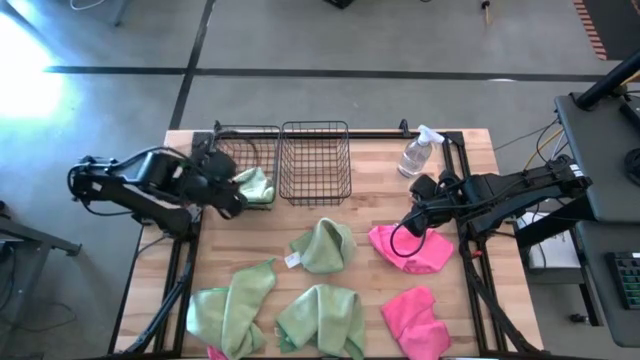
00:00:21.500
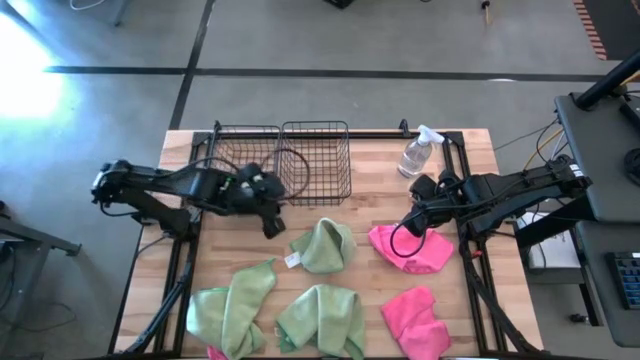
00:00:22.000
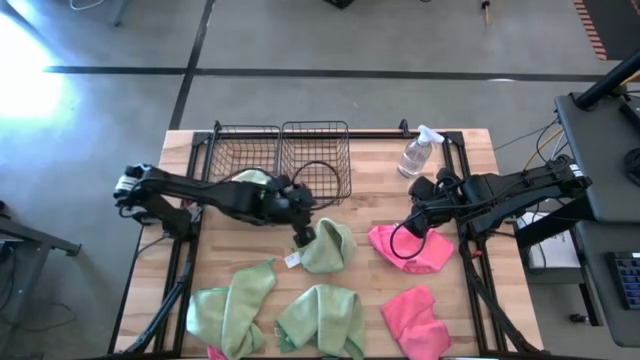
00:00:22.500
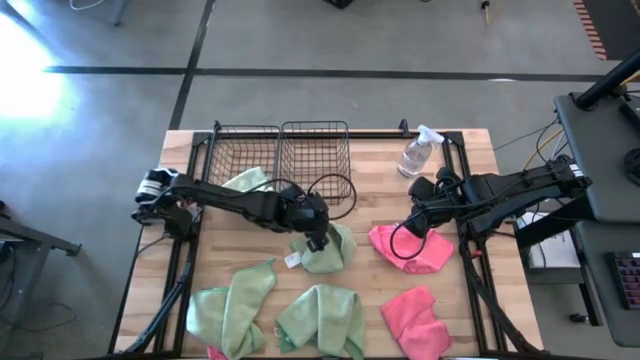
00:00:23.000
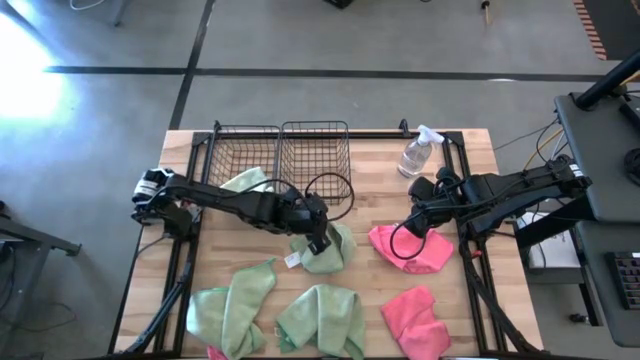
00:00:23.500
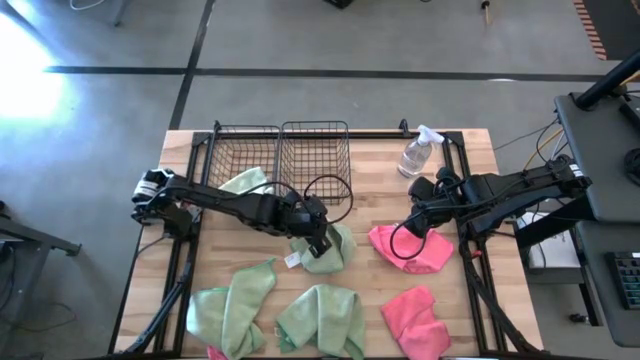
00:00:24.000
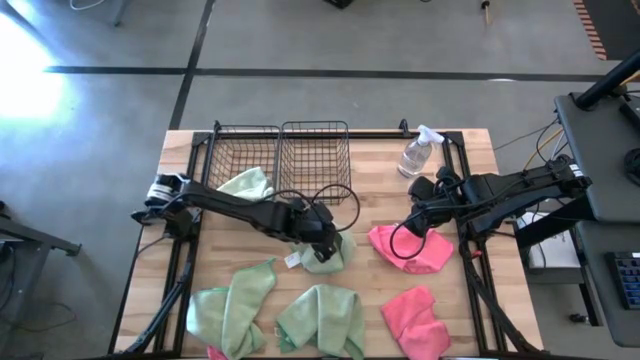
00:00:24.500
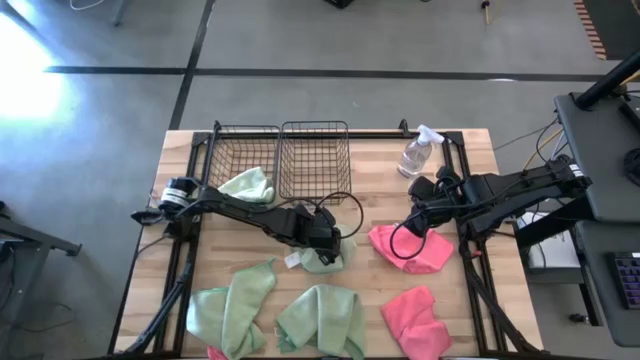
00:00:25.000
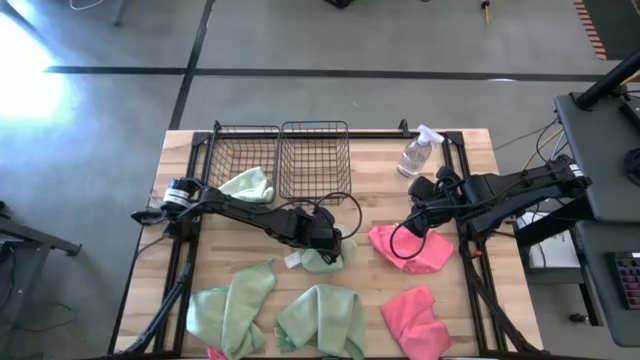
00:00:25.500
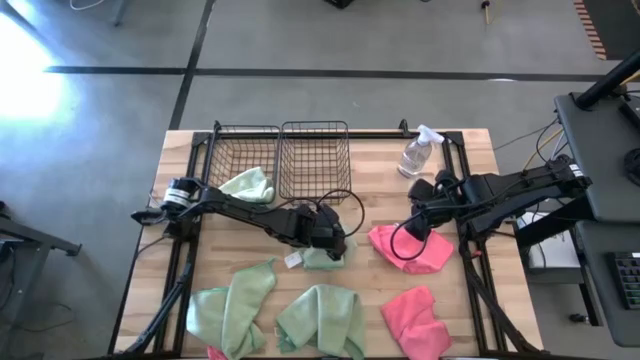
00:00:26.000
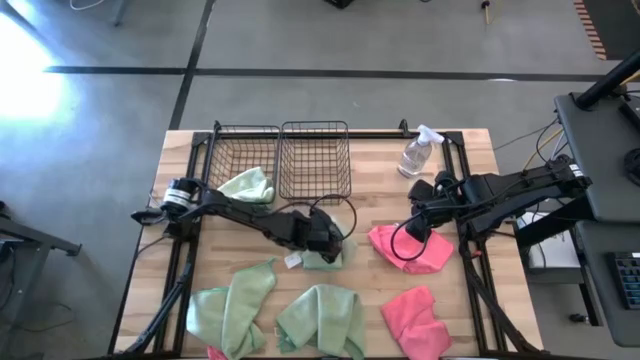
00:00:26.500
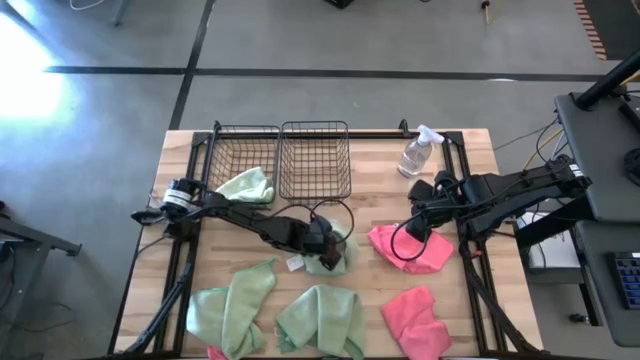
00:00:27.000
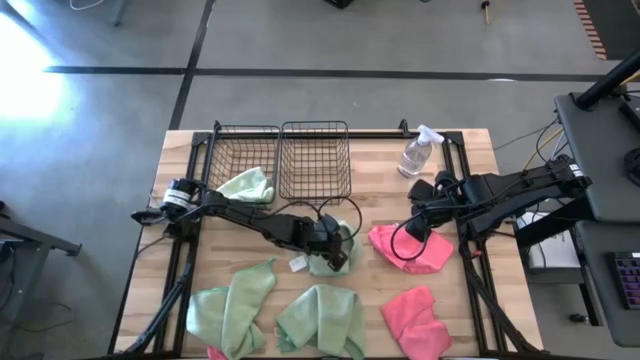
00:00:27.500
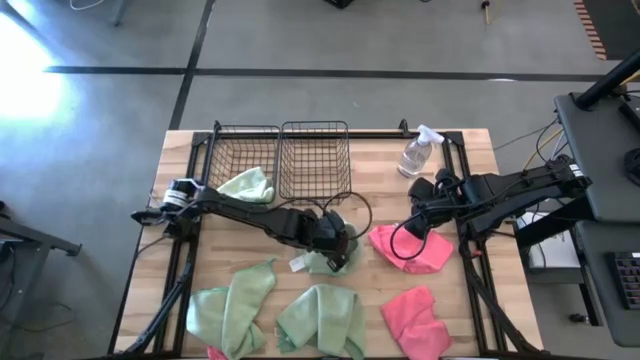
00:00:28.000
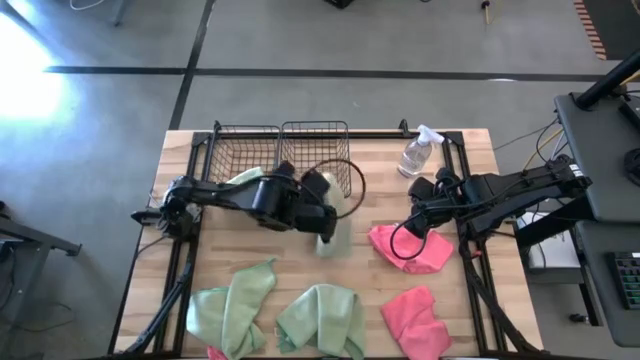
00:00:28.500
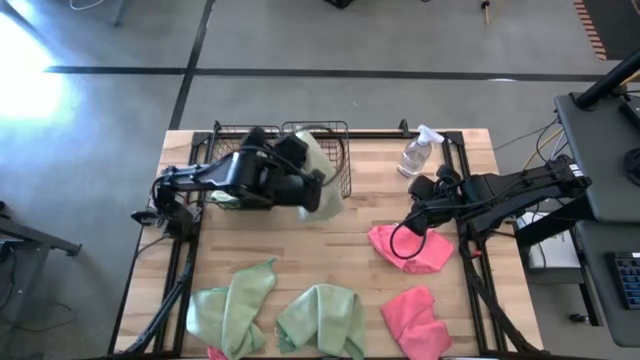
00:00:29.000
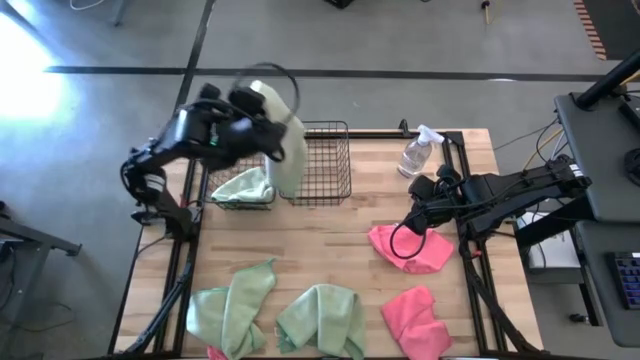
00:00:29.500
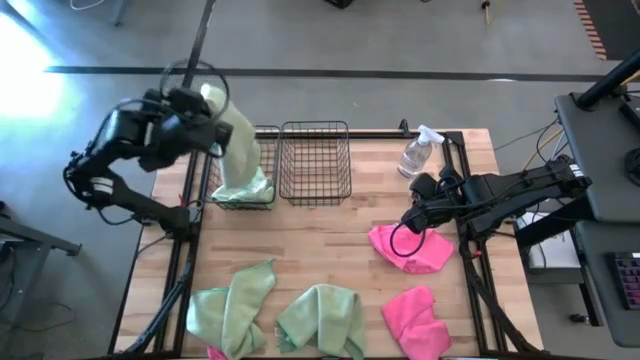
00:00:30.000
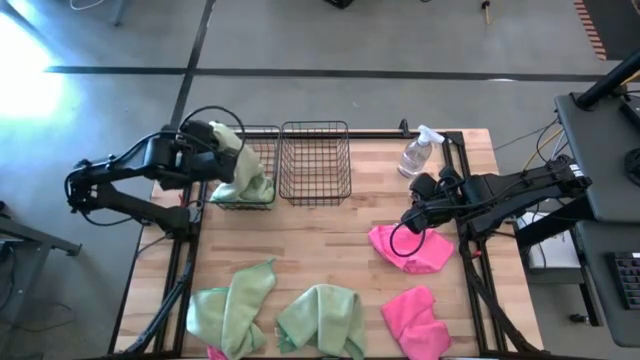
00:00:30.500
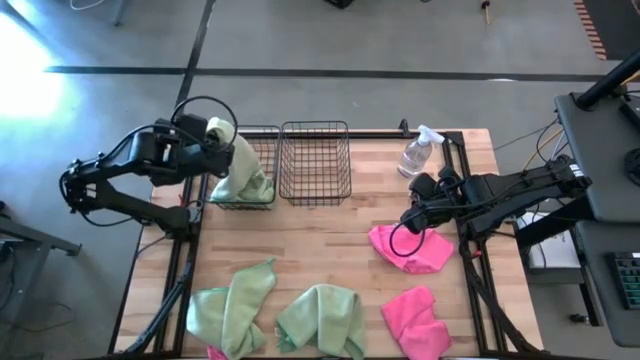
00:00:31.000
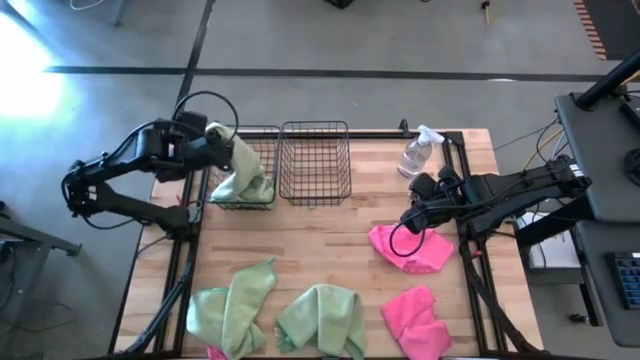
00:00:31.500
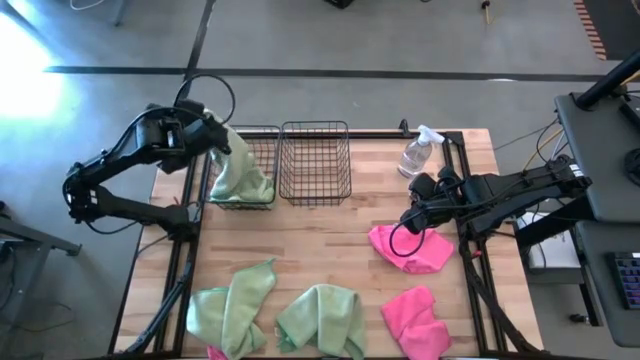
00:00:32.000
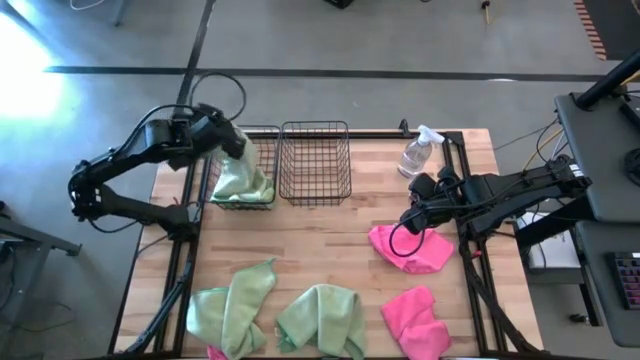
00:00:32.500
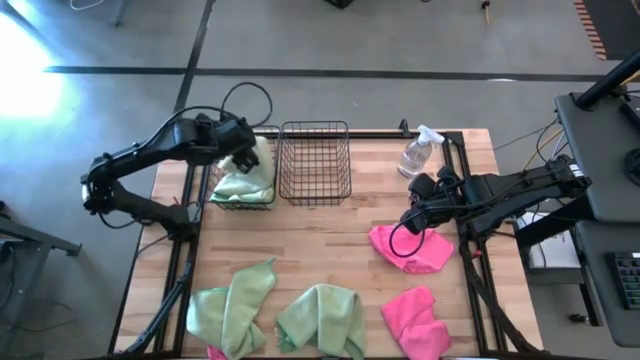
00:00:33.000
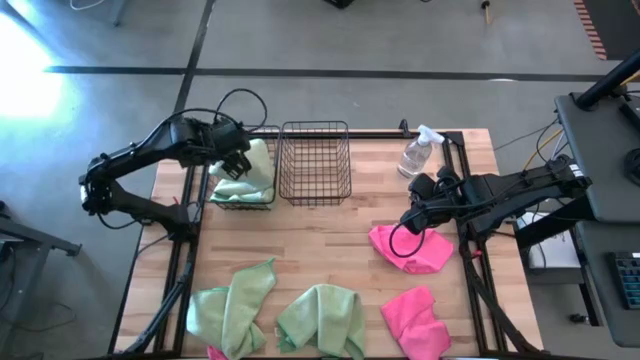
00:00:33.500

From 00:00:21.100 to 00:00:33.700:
Task: Sort microfiber towel by color & place in baskets
Put the green microfiber cloth into the left wire basket

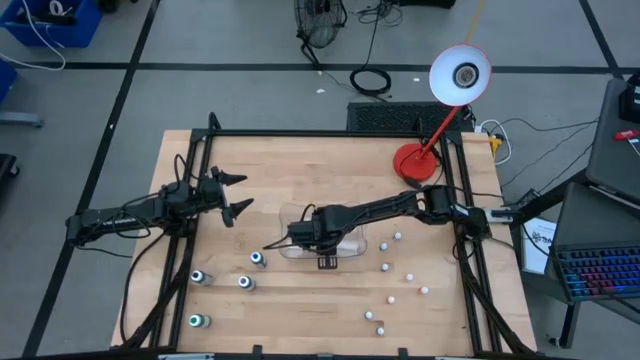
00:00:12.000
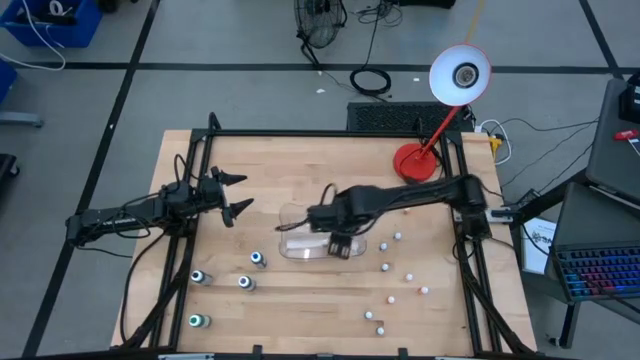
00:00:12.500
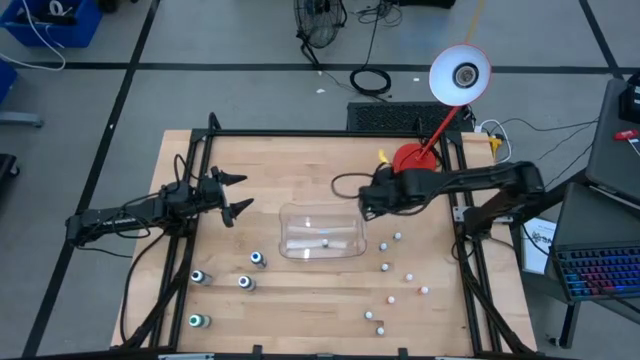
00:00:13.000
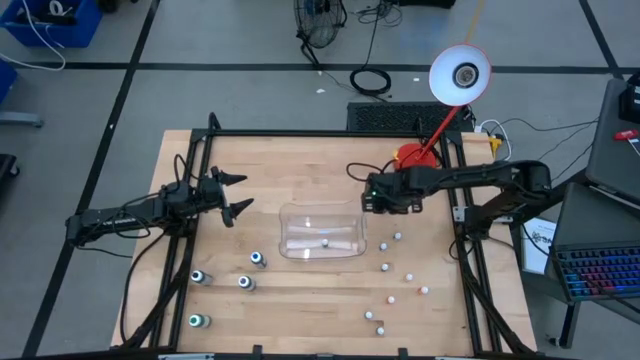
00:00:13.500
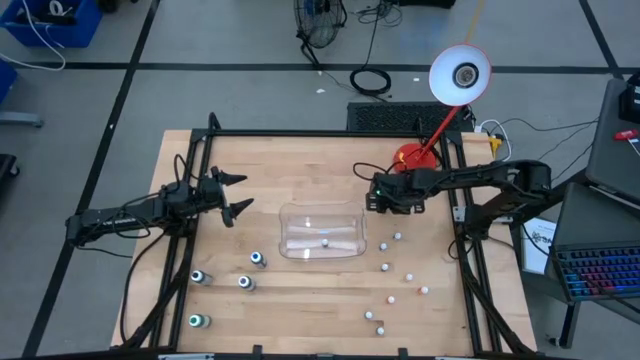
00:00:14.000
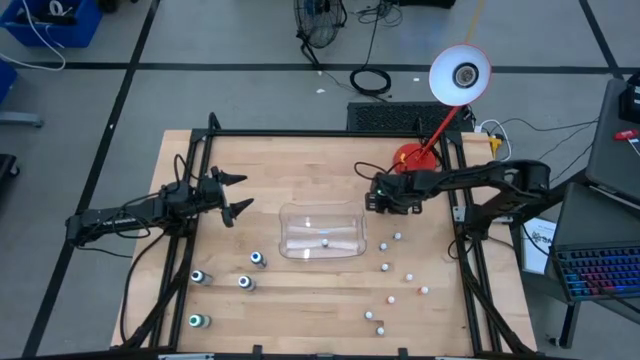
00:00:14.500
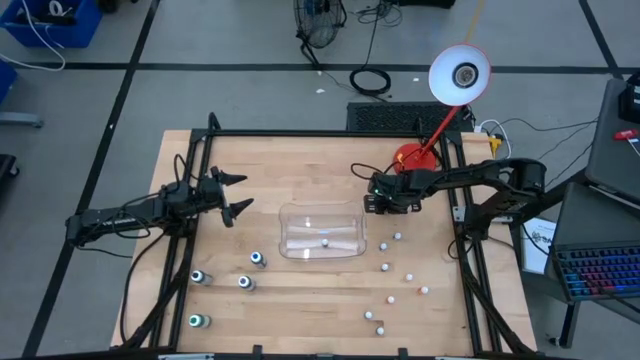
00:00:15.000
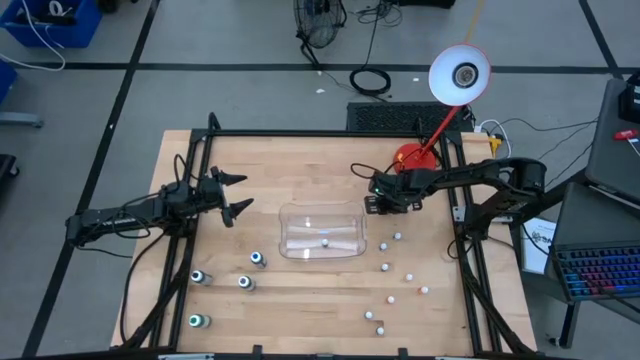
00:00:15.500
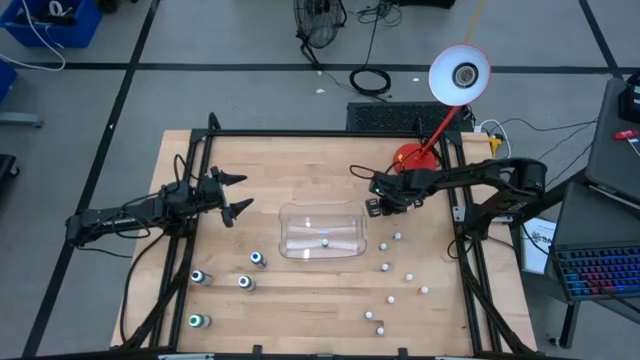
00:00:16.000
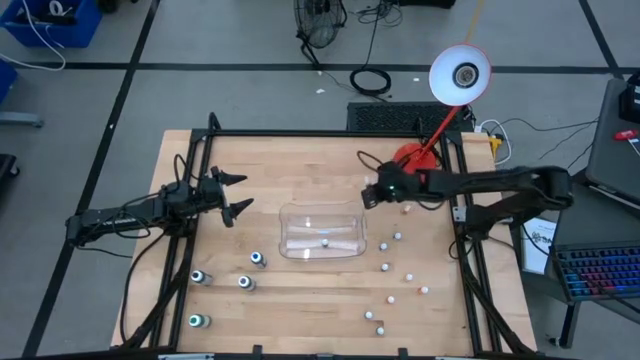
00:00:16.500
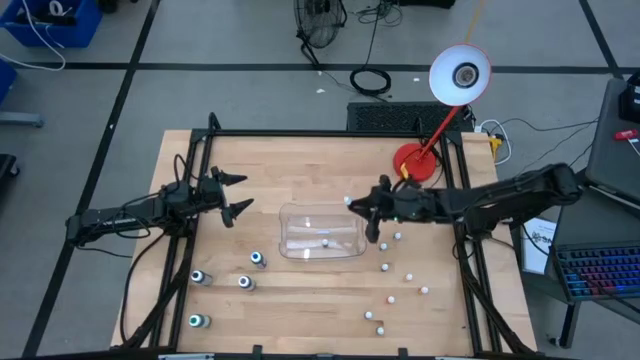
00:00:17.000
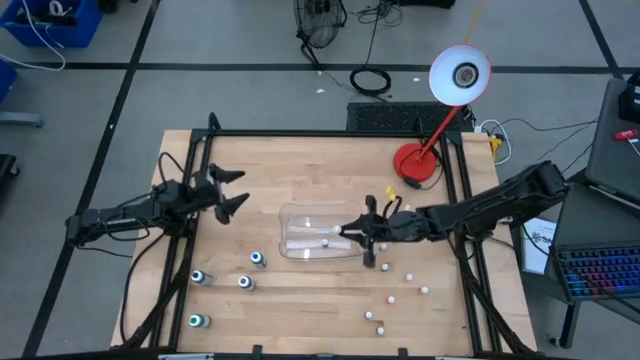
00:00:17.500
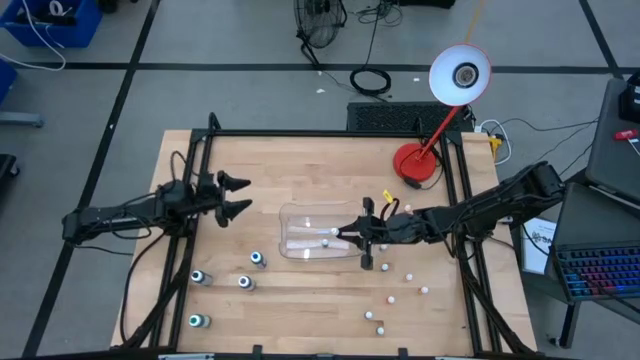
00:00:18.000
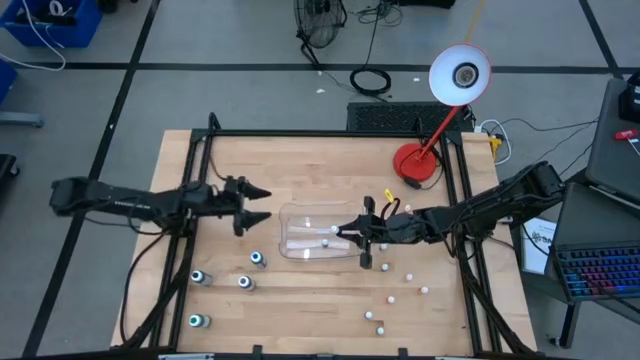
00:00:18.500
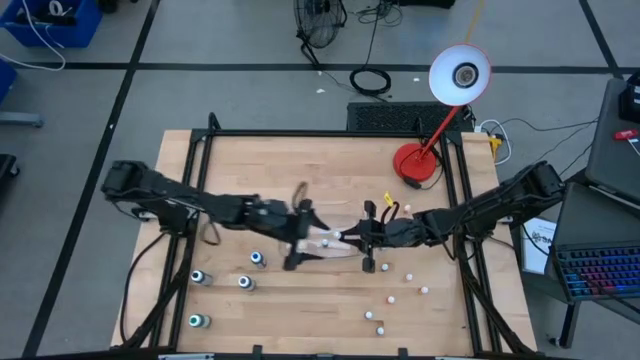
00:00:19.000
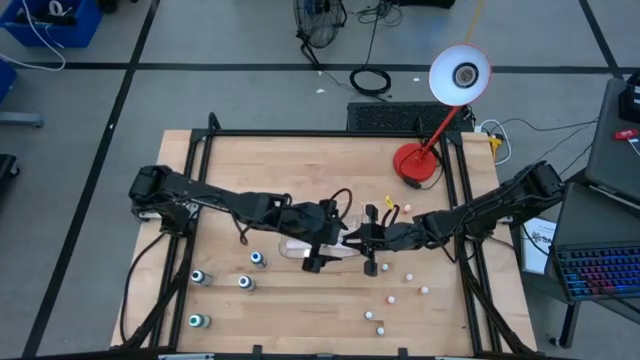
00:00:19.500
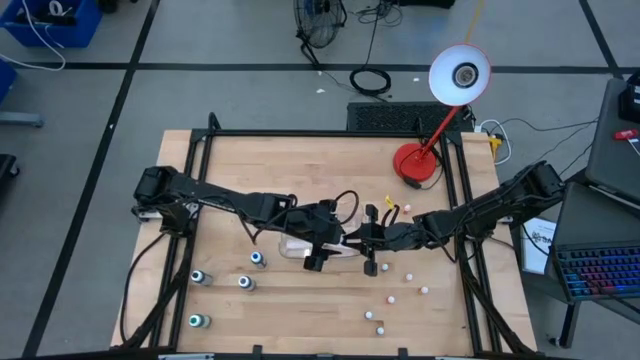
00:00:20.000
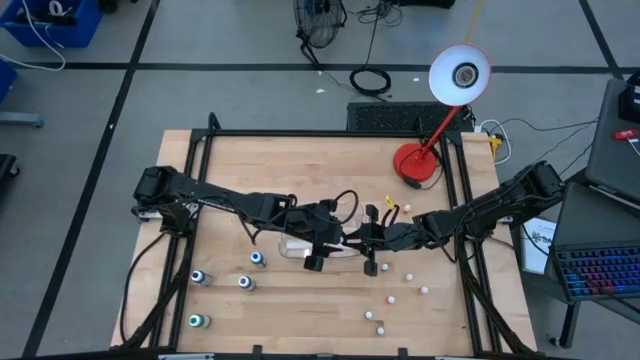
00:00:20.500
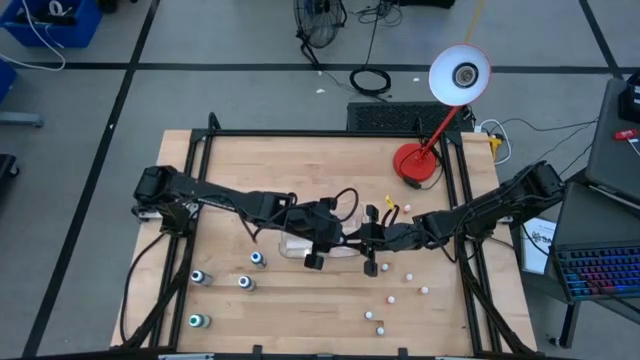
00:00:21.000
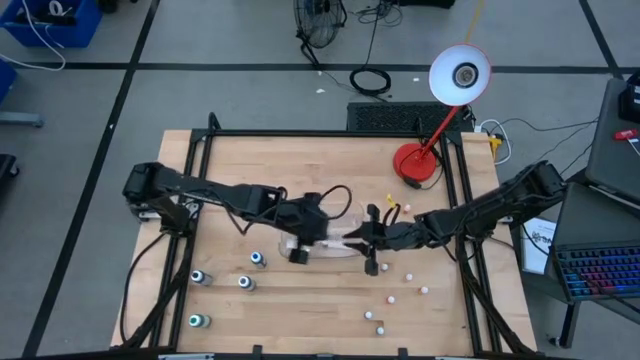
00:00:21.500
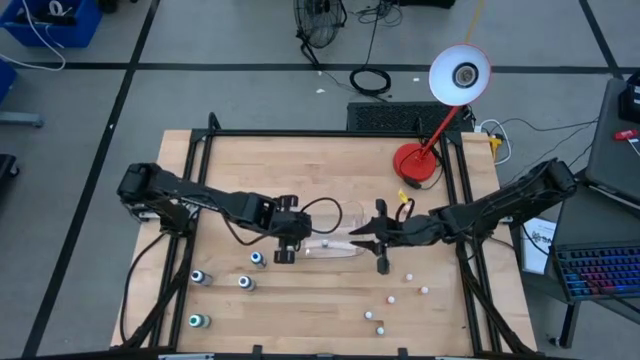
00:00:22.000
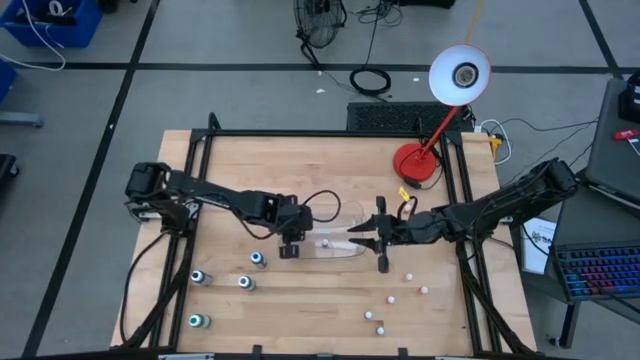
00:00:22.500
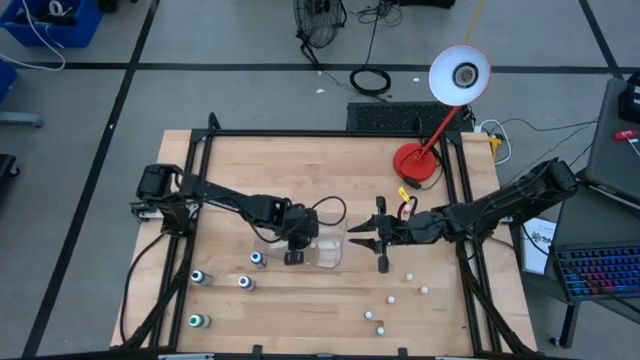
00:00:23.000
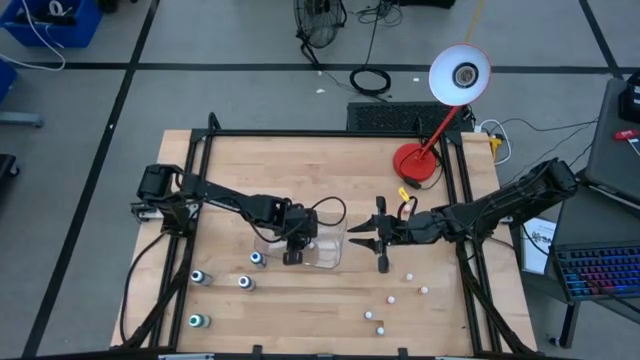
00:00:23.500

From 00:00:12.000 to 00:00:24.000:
Task: Pick & Place food coloring
Put the small red food coloring bottle into the transparent bin
